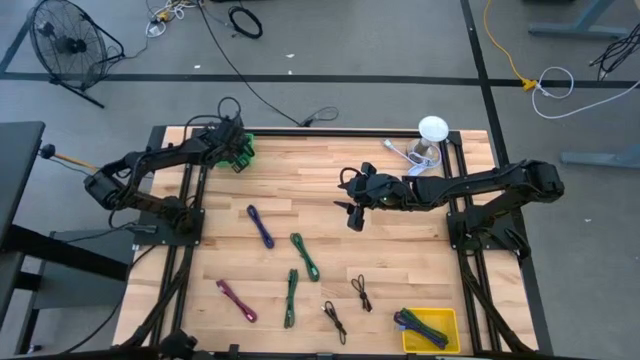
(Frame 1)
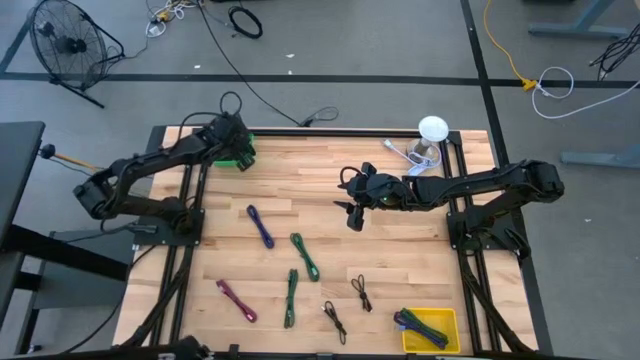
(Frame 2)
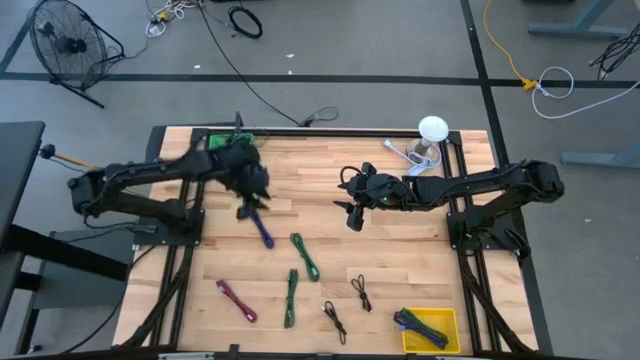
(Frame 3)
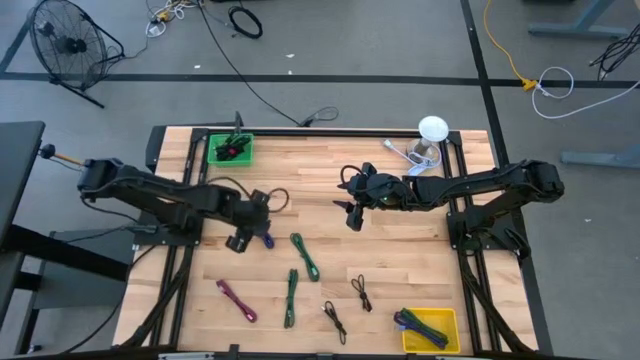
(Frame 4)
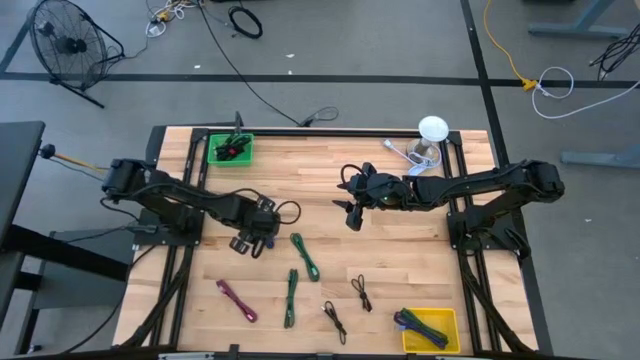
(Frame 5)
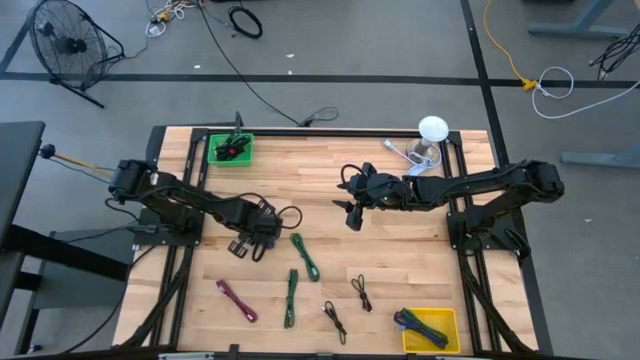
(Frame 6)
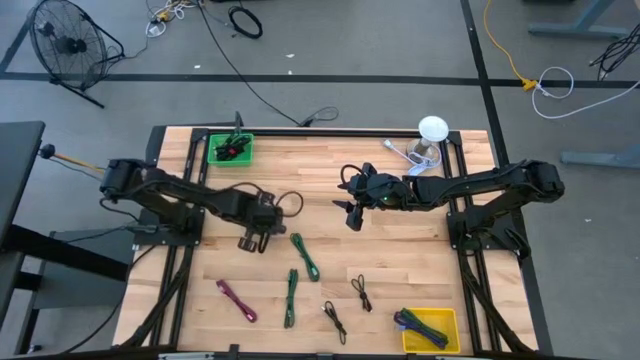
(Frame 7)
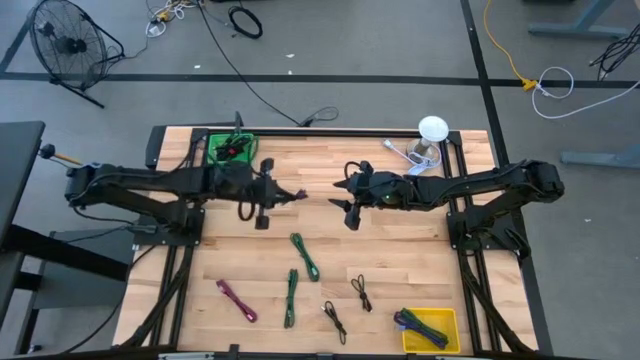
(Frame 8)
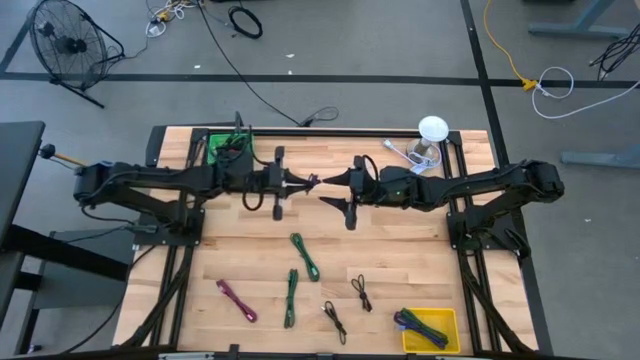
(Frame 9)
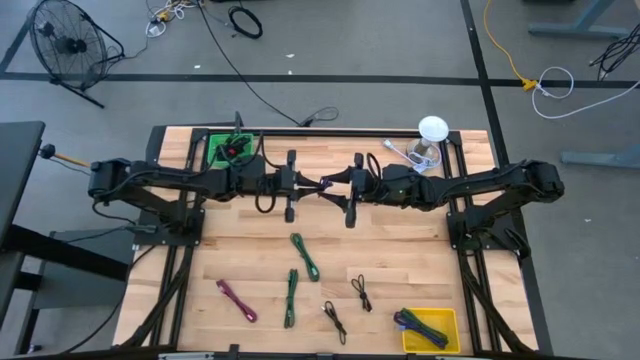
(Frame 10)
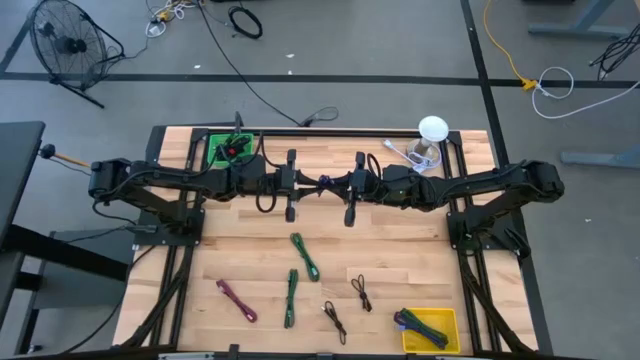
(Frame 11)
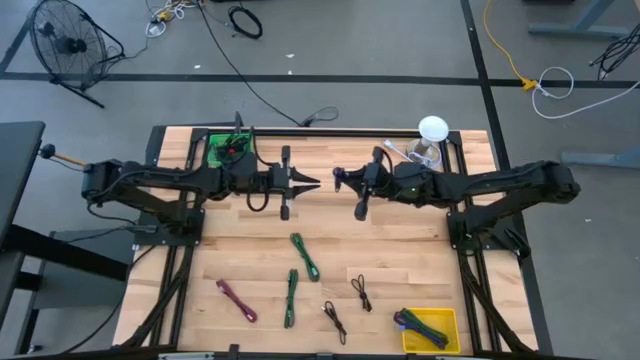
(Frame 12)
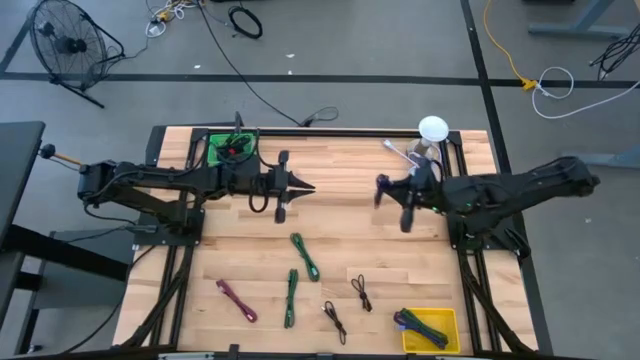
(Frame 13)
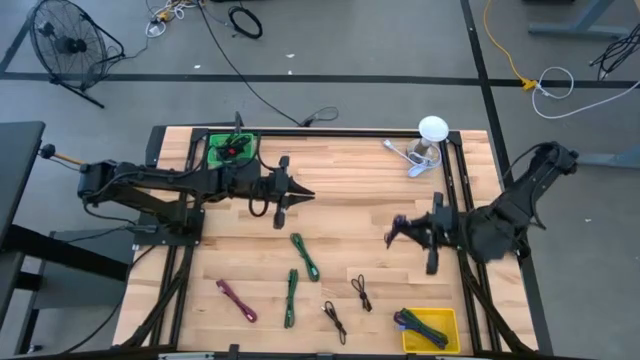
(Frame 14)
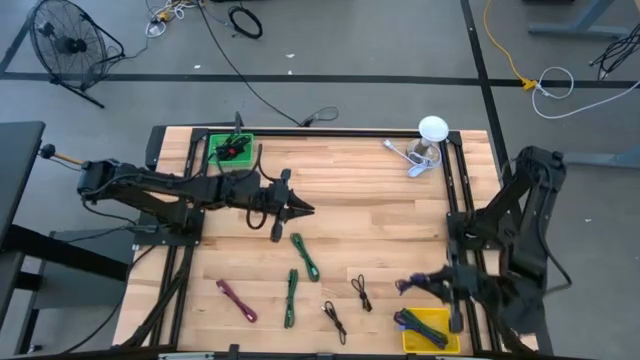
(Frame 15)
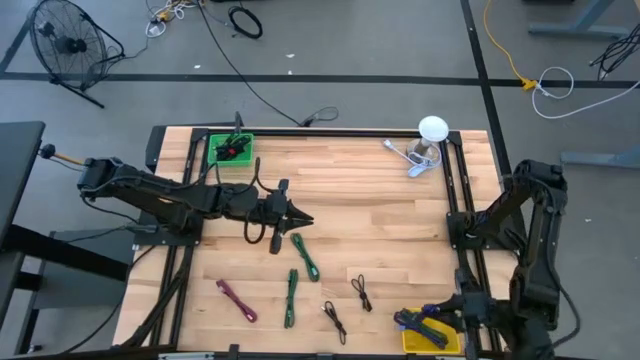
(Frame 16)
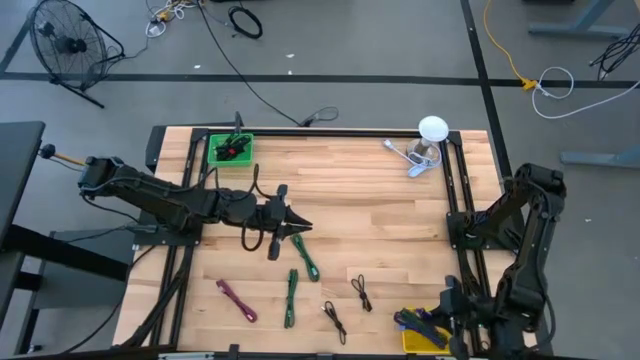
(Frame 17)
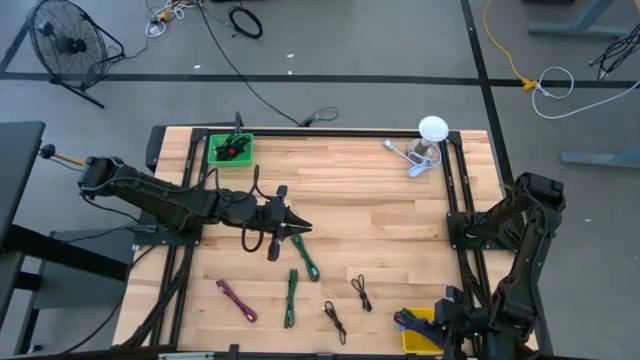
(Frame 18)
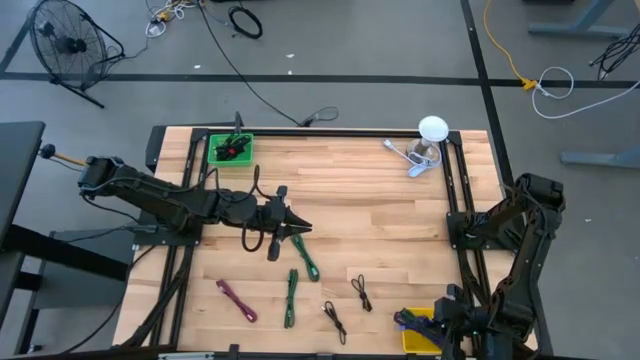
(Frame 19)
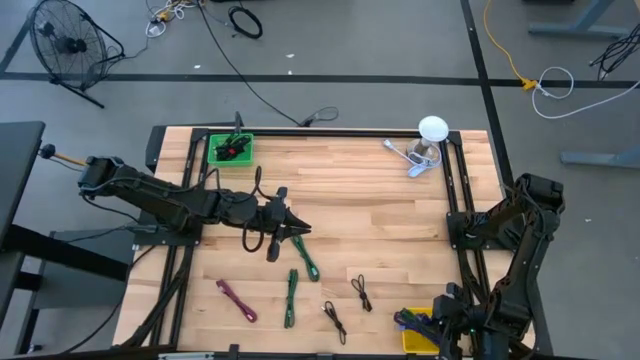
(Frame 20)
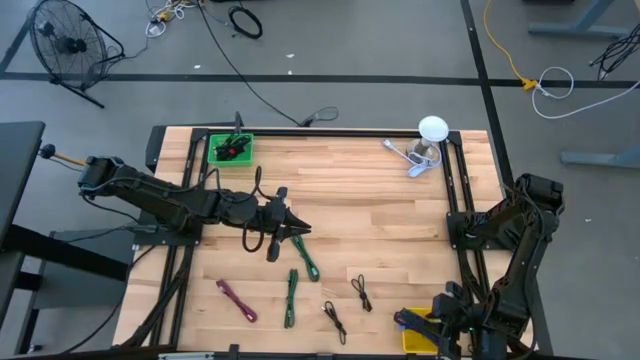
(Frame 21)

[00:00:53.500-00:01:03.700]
Task: Pick & Place USB Port
Put the blue charger cable into the yellow bin

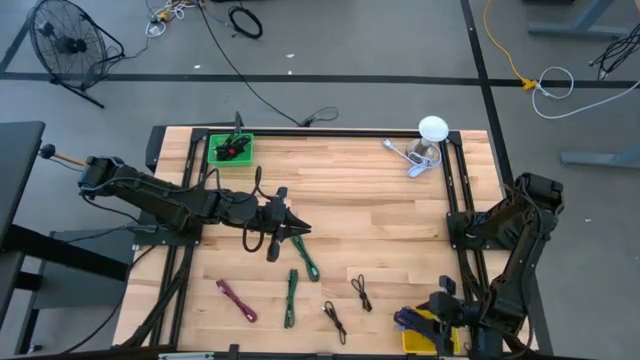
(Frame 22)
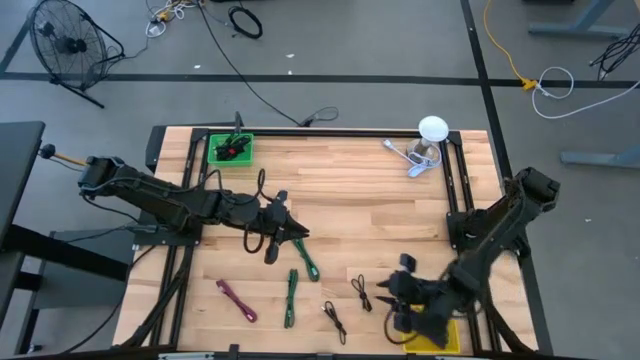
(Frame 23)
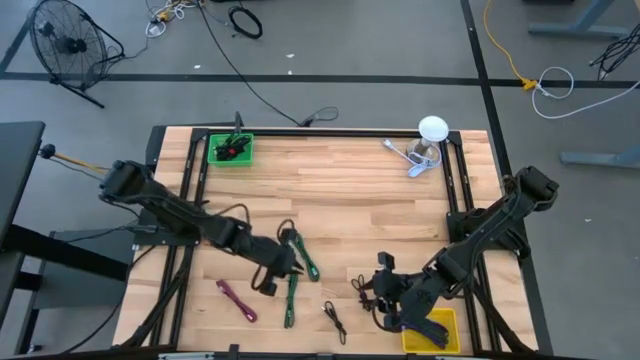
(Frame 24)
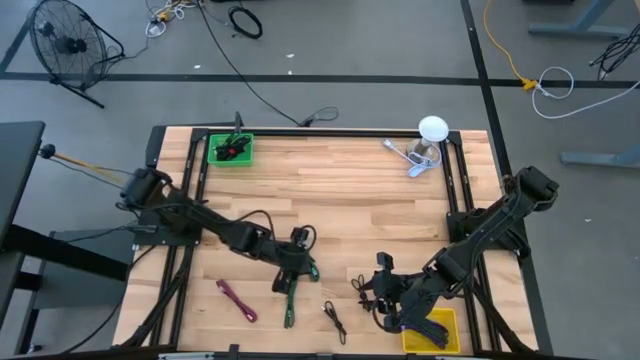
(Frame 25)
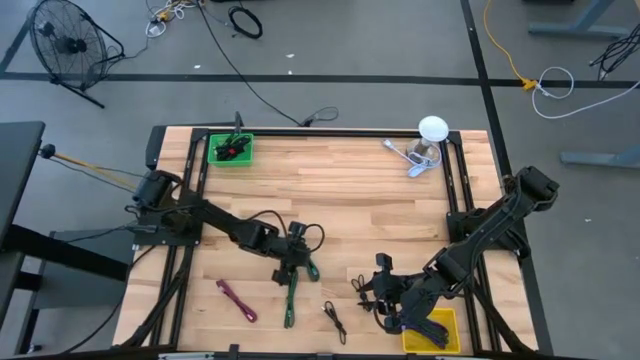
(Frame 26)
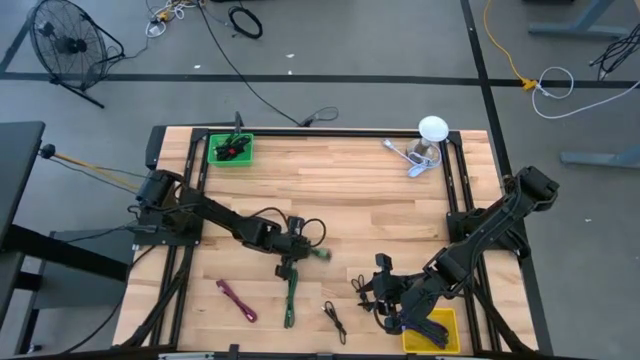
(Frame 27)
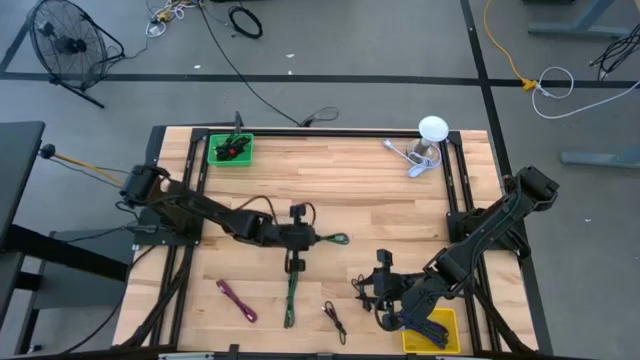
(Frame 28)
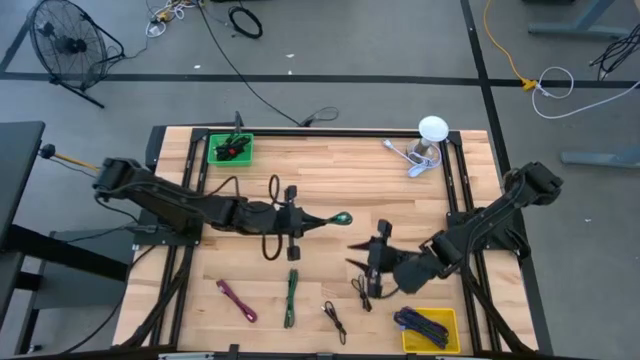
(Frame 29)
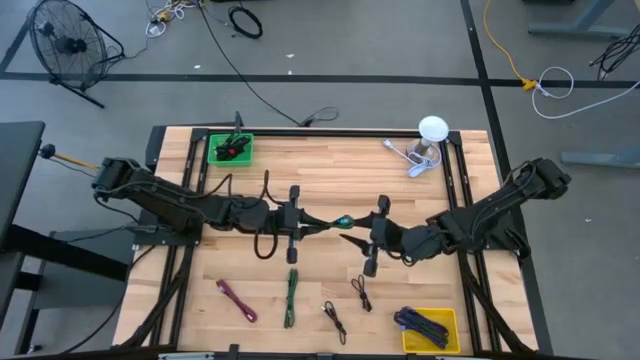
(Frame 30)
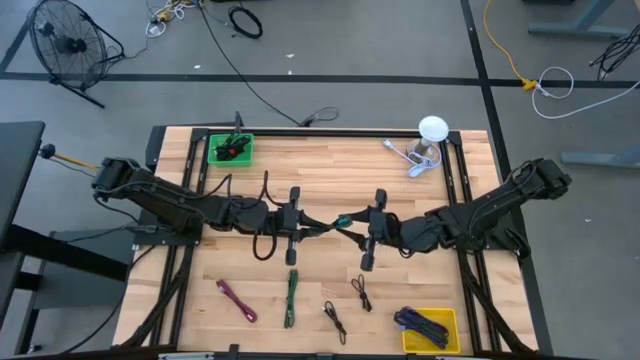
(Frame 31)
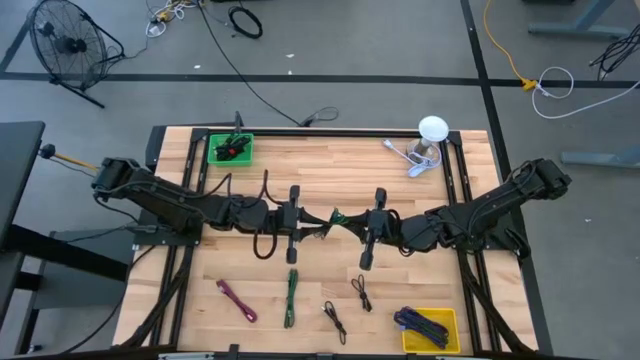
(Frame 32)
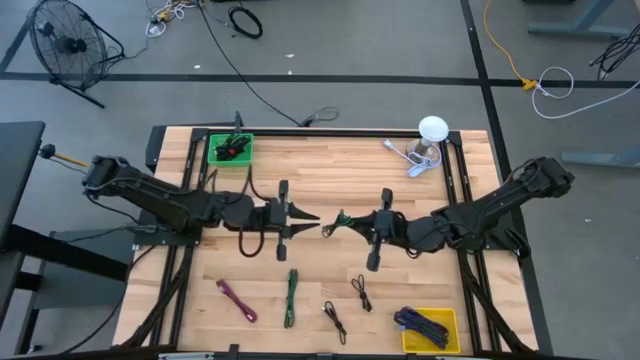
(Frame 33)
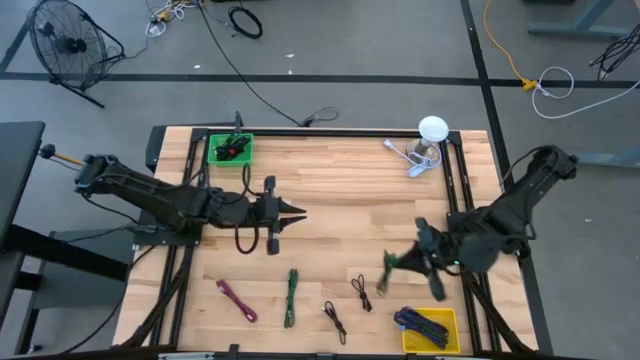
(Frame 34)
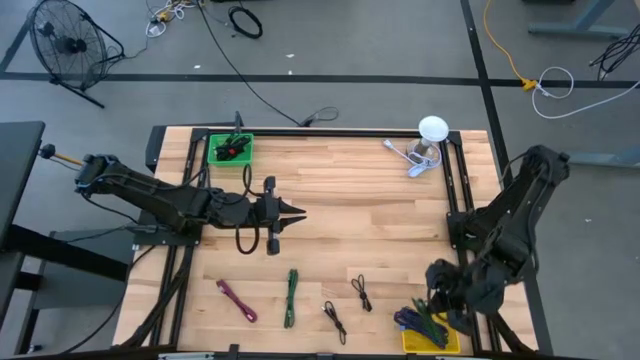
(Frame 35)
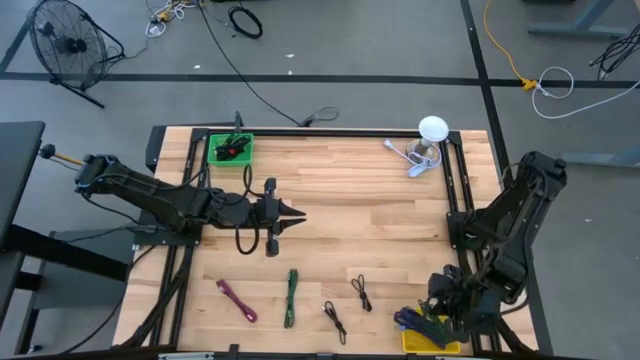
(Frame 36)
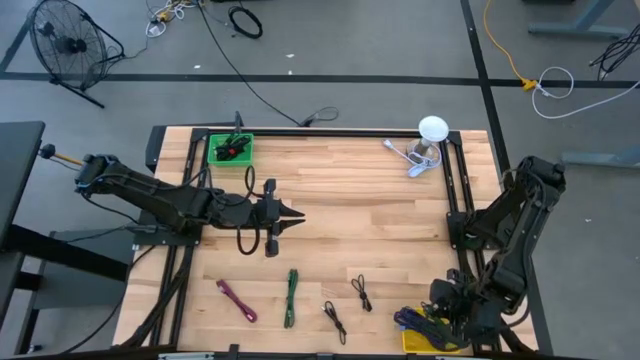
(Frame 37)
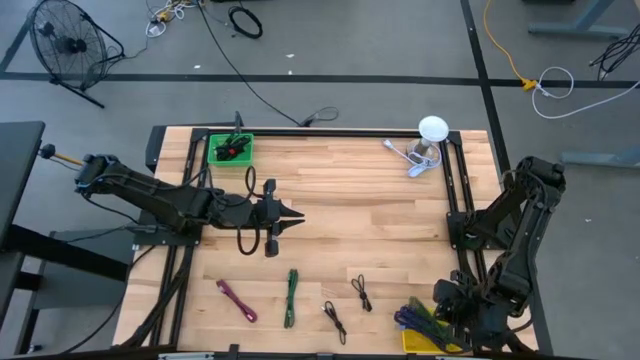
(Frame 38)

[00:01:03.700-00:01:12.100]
Put the green charger cable into the yellow bin

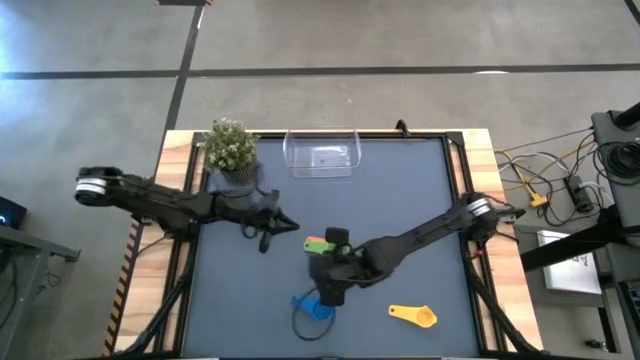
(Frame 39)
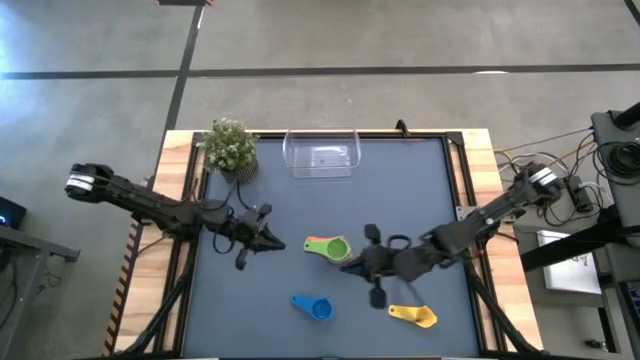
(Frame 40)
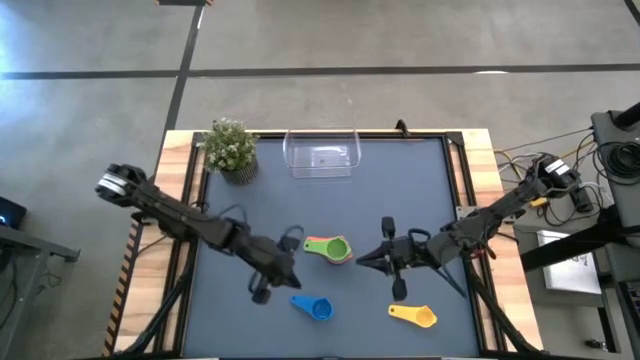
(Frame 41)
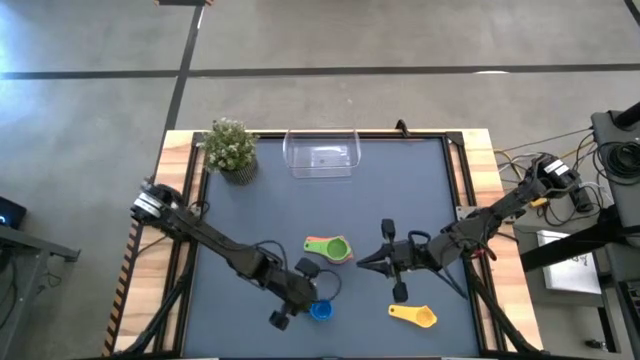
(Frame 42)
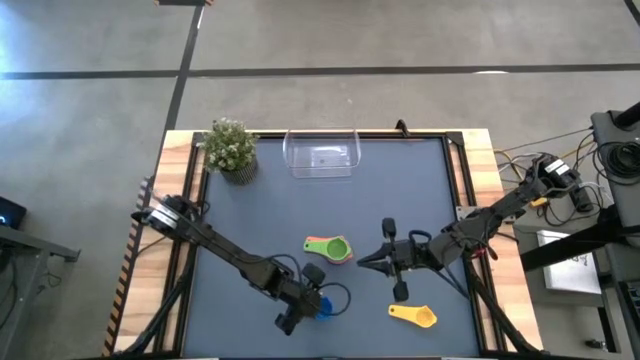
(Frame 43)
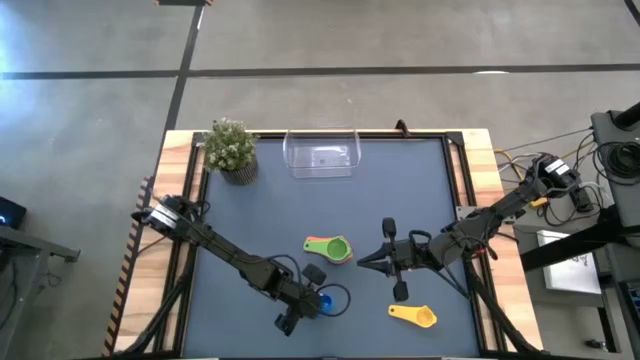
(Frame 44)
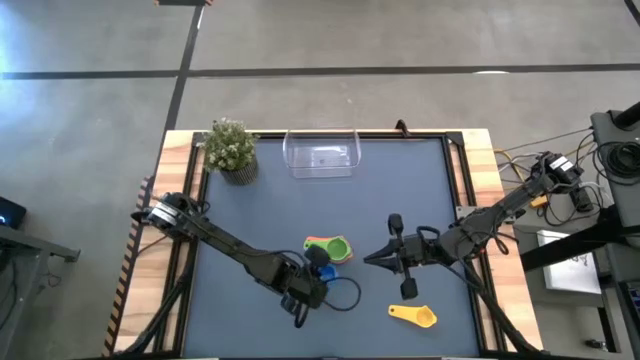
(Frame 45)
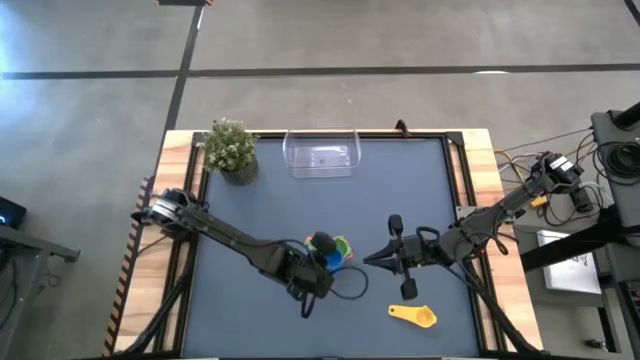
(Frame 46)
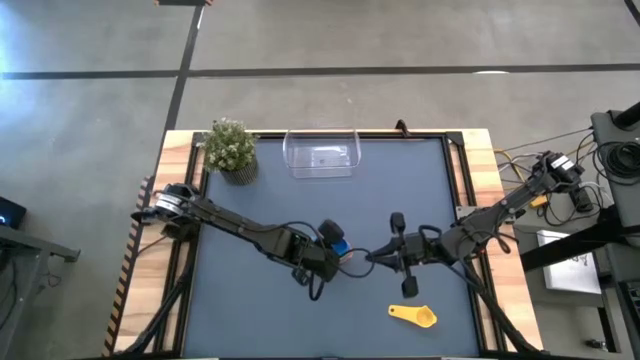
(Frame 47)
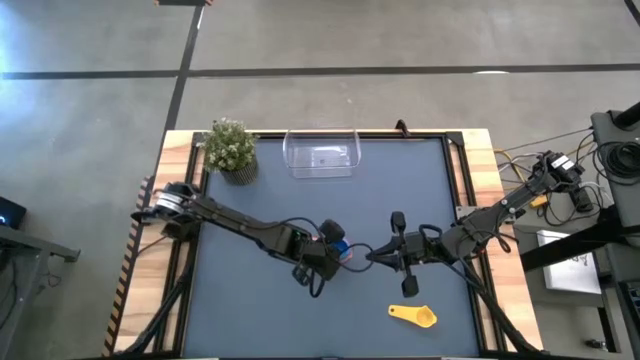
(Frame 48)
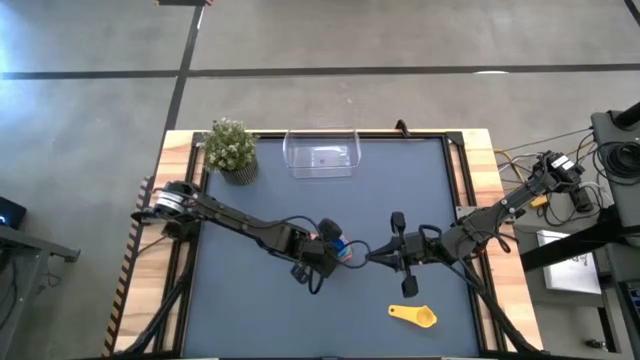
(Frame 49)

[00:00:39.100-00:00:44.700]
Task: Nest measuring cups in basket
Stack the blue measuring cup on top of the green measuring cup
